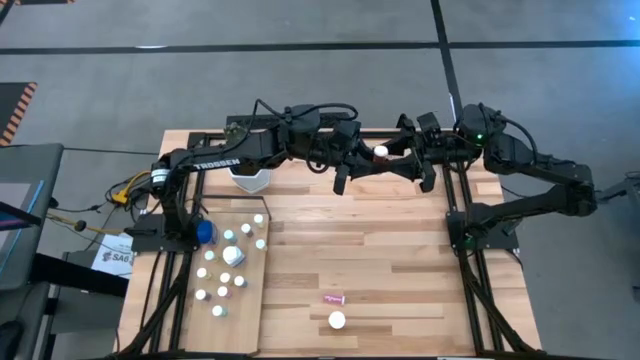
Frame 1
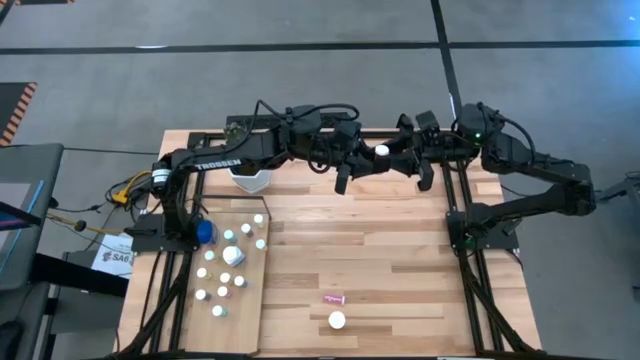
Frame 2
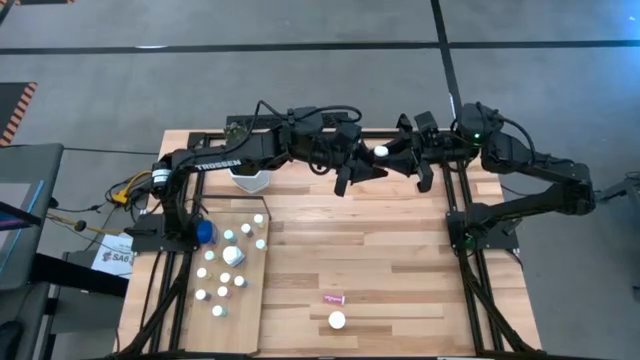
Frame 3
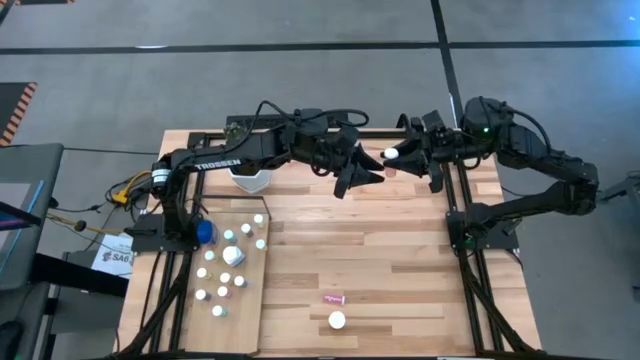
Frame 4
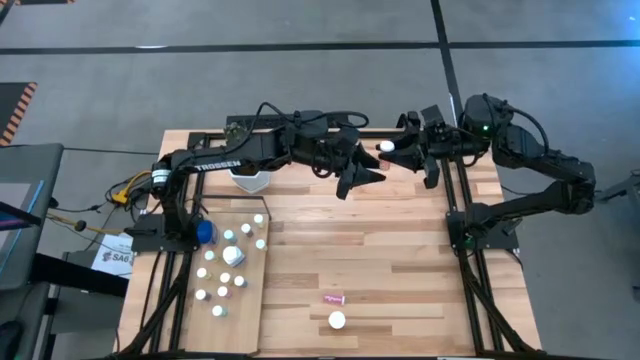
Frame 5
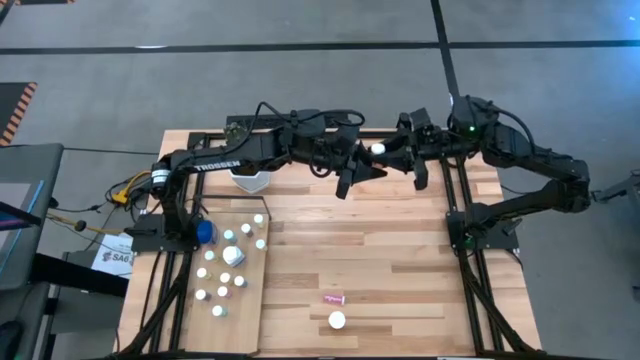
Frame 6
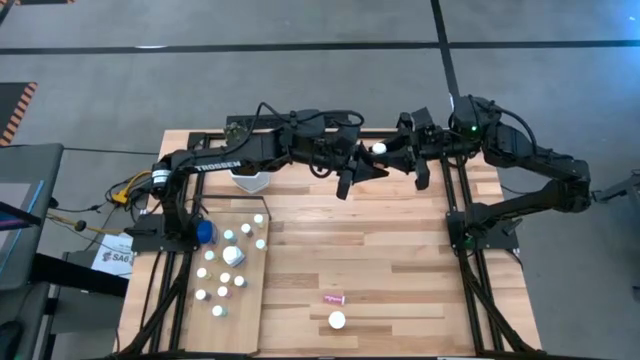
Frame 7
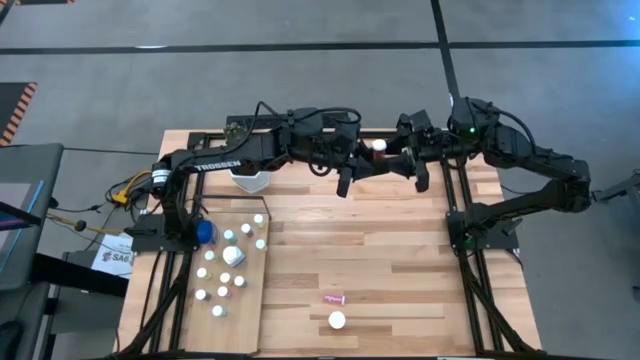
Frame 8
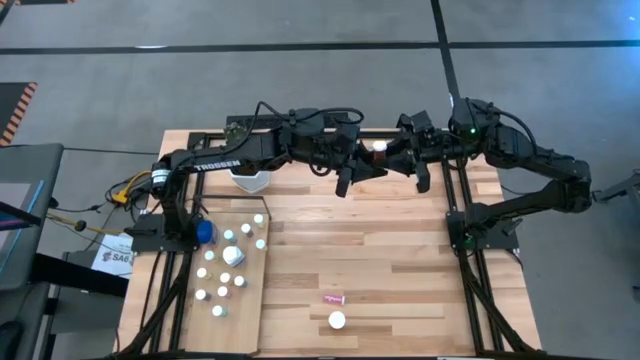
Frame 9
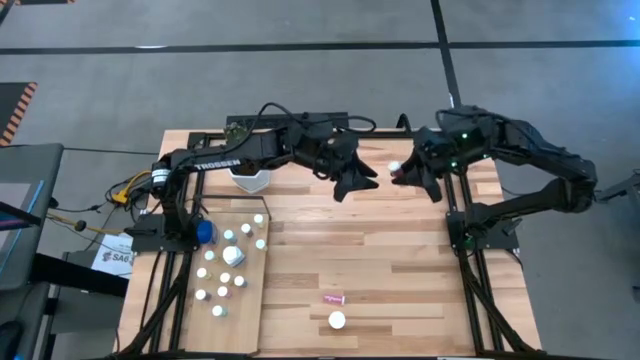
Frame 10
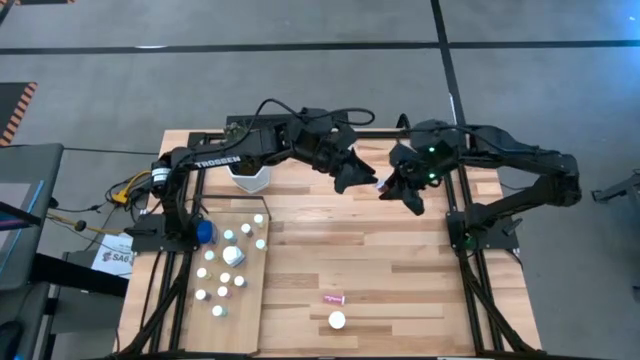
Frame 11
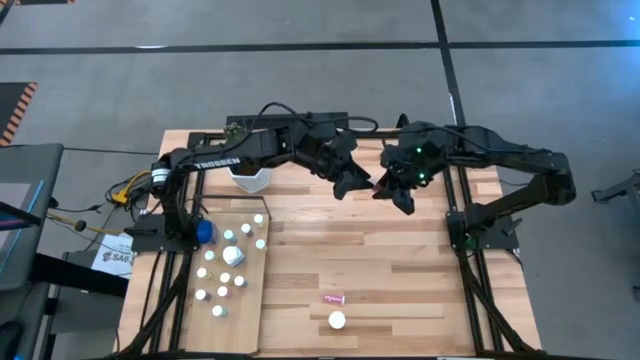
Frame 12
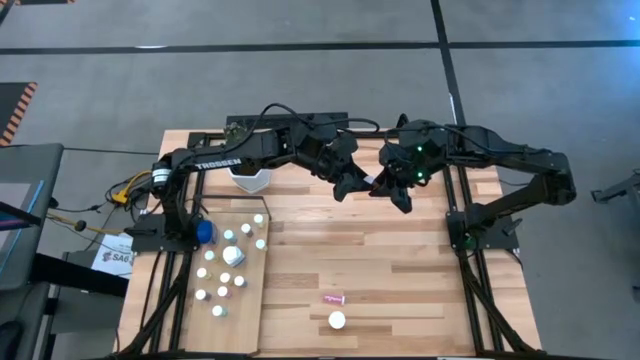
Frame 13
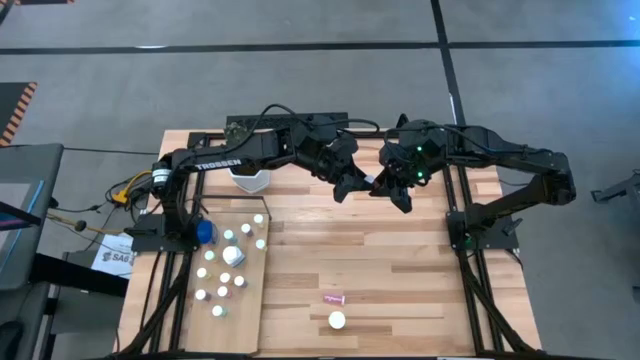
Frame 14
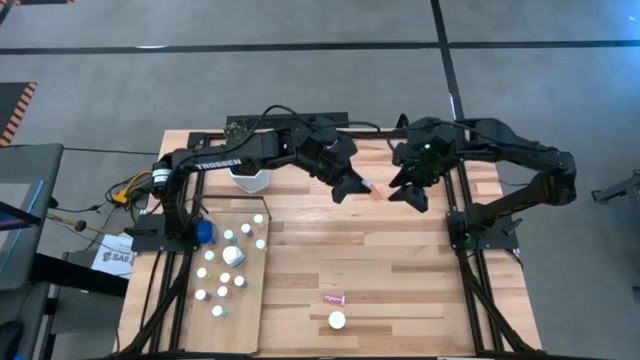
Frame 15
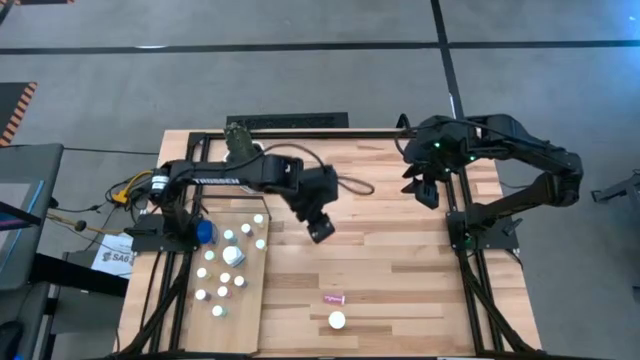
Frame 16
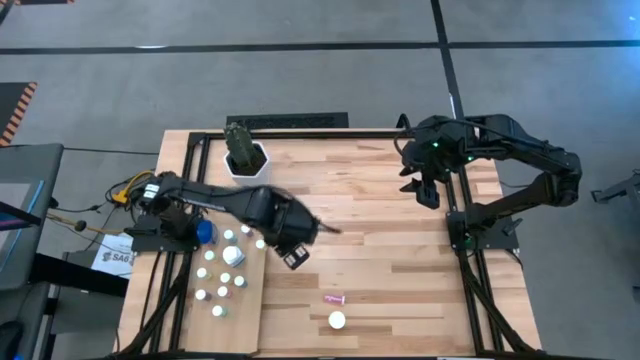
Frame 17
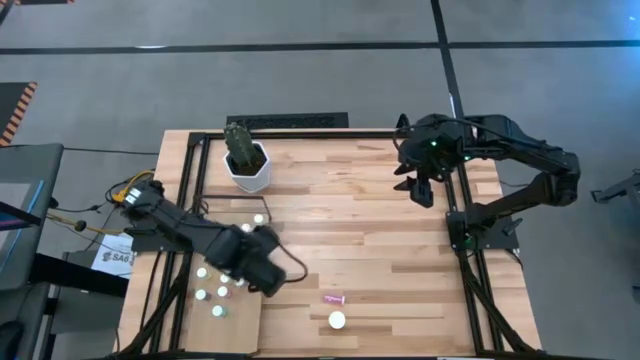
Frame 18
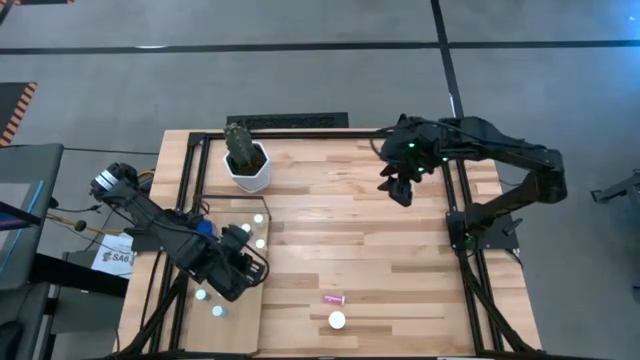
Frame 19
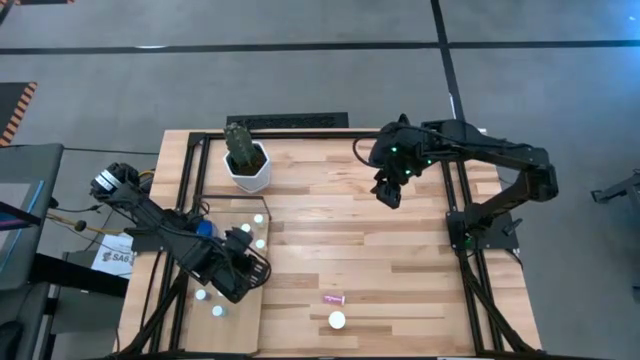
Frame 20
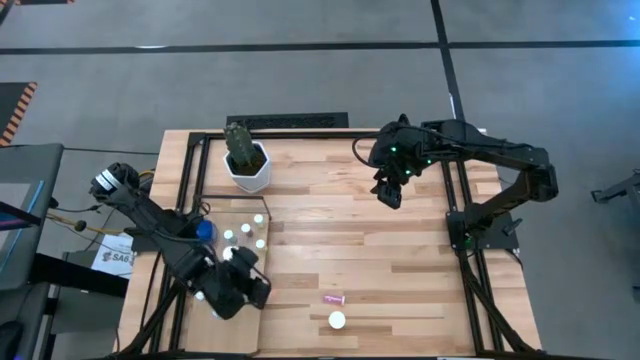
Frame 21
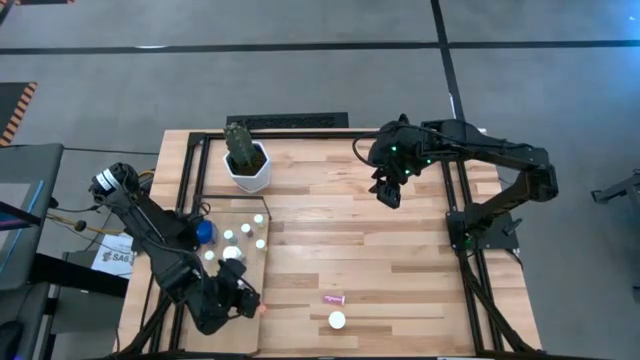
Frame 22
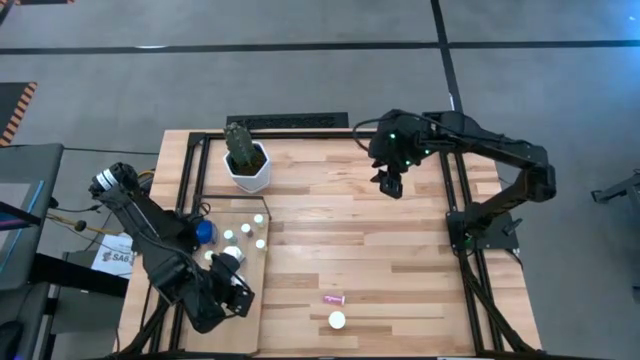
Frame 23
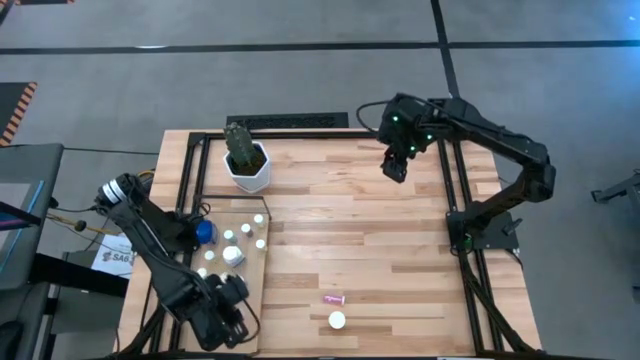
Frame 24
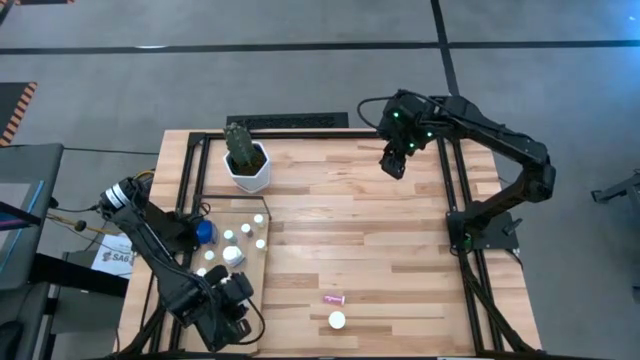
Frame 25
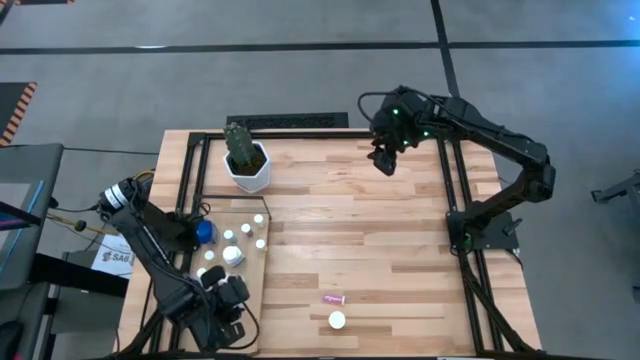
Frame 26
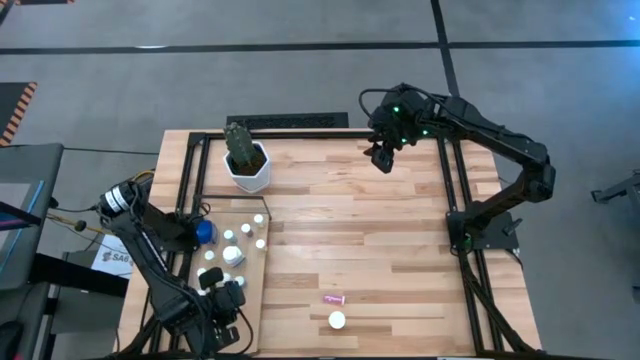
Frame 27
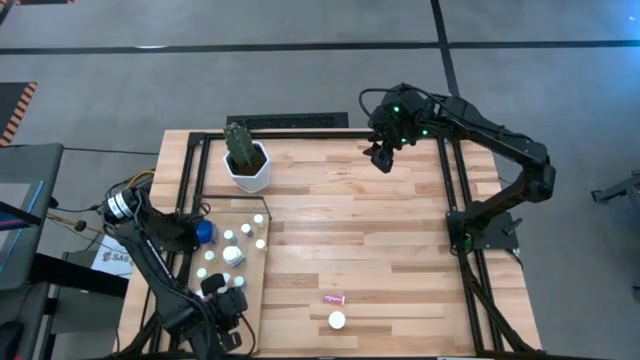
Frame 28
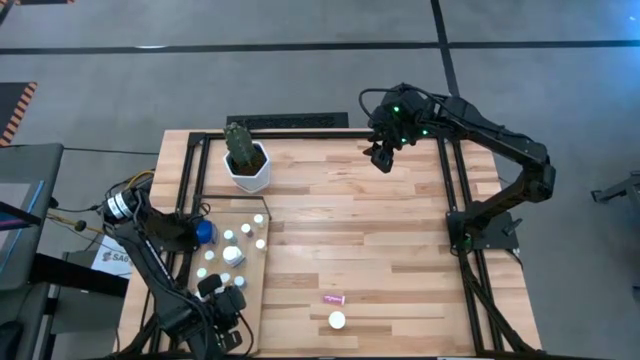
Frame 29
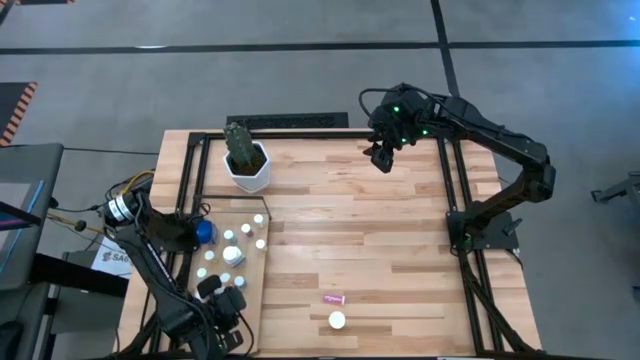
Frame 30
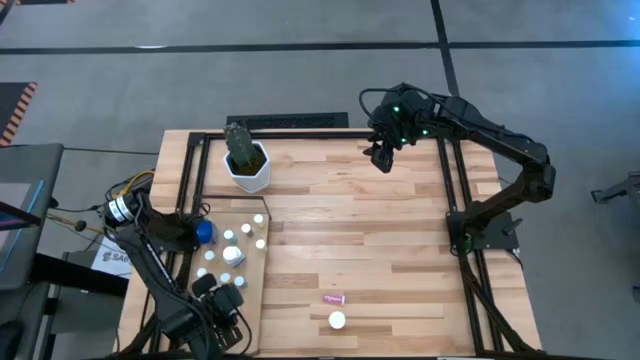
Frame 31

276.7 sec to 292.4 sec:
Task: Pick and place medicine bottles onto shelf by color
Put the red pill bottle on the shelf

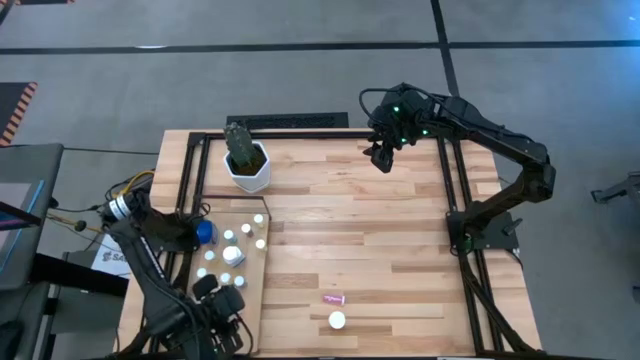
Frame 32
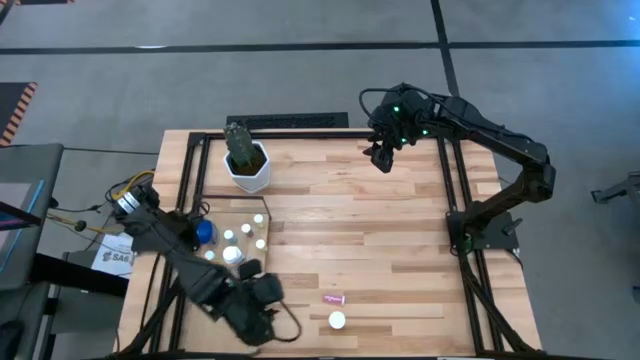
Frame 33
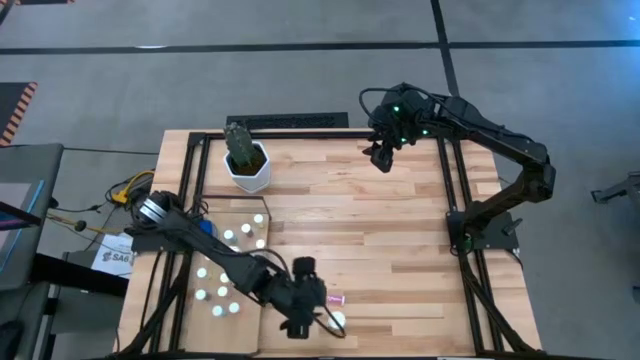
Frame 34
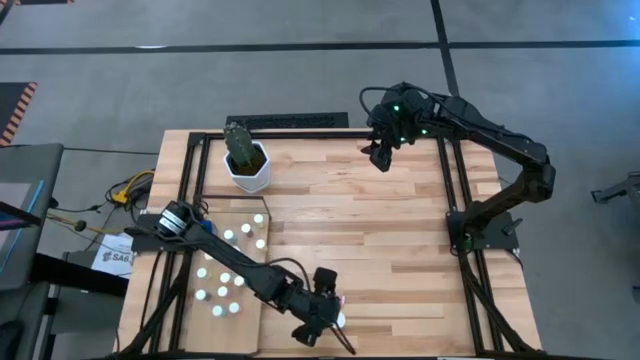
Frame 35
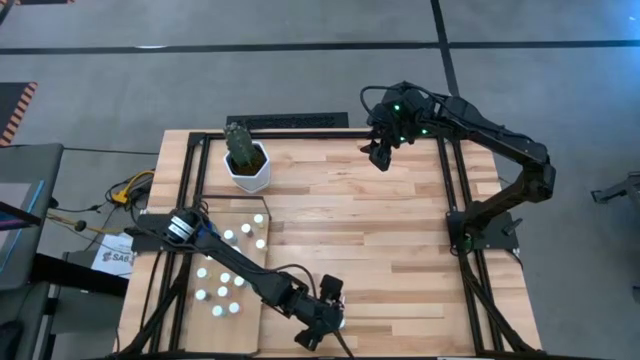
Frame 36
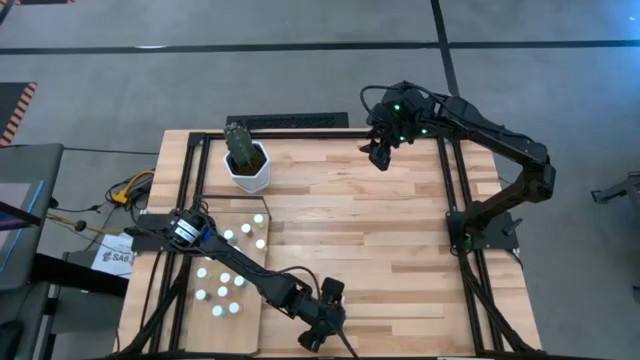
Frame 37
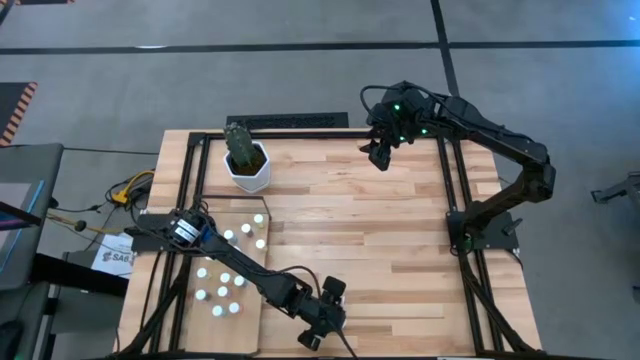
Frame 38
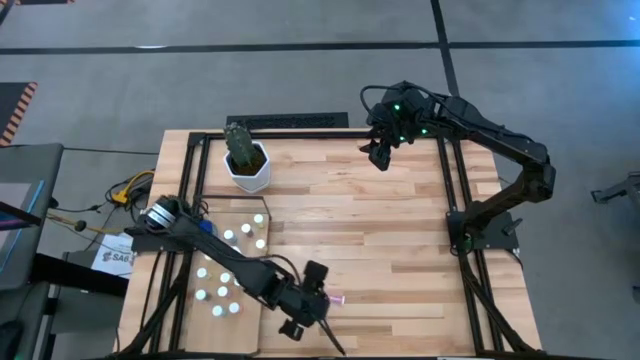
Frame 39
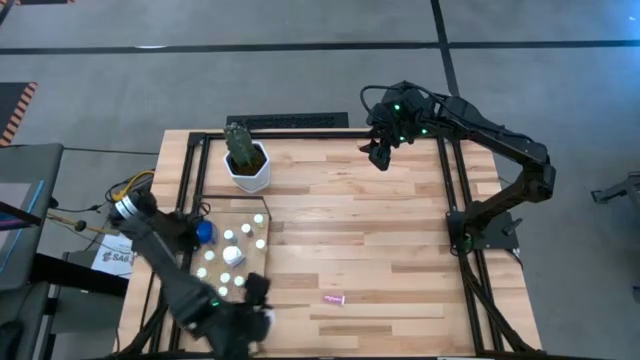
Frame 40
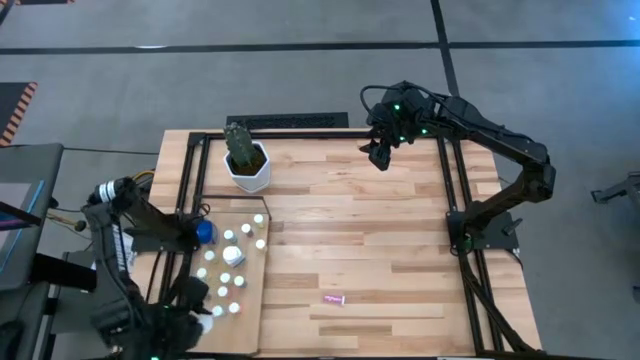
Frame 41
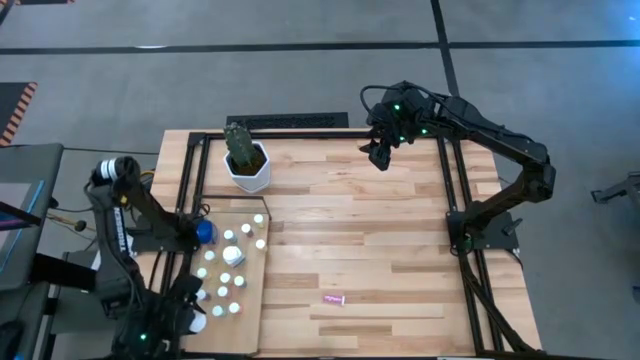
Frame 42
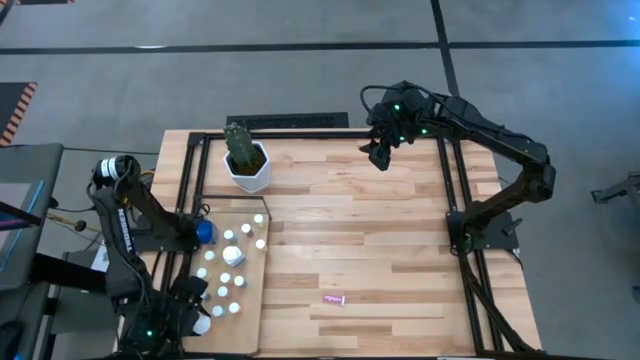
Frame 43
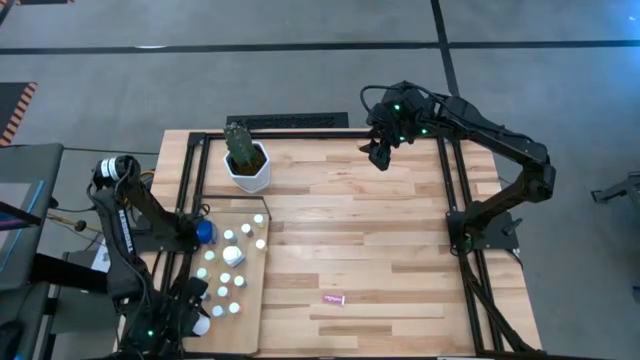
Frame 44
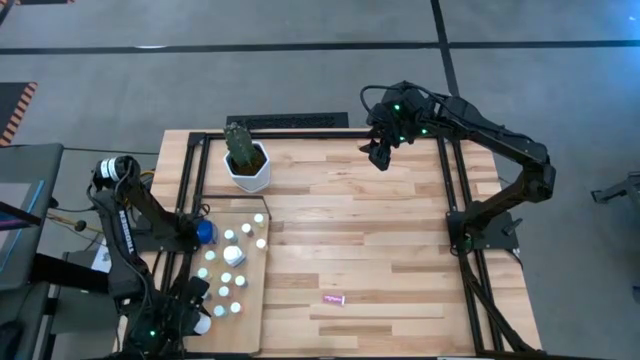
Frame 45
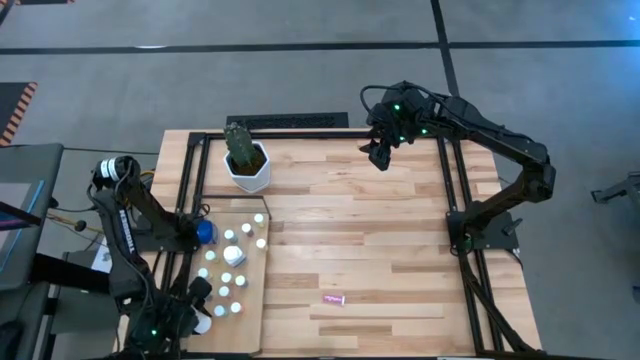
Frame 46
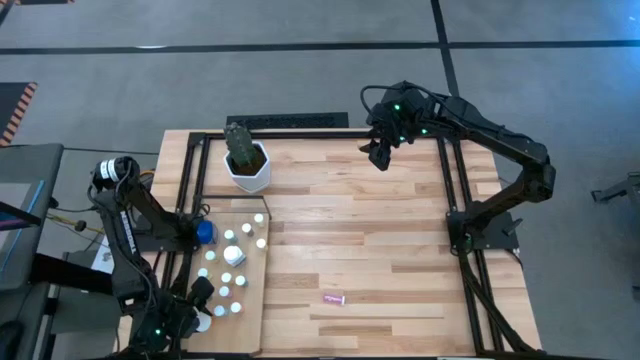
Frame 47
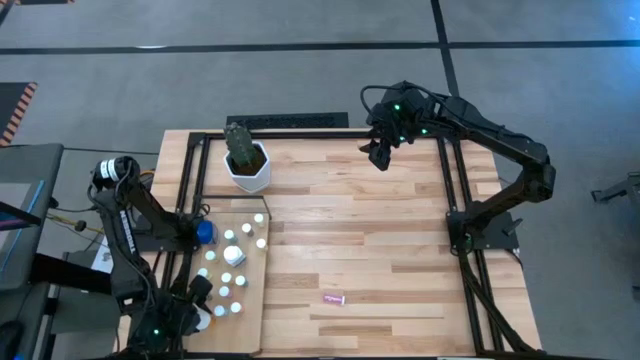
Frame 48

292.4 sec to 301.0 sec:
Put the orange pill bottle on the shelf
